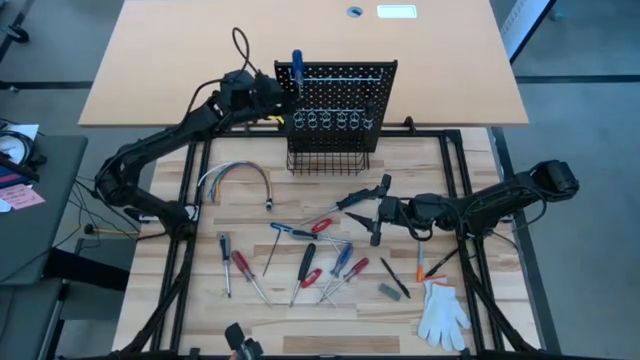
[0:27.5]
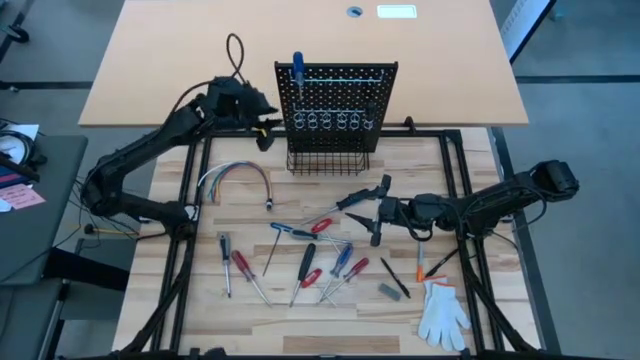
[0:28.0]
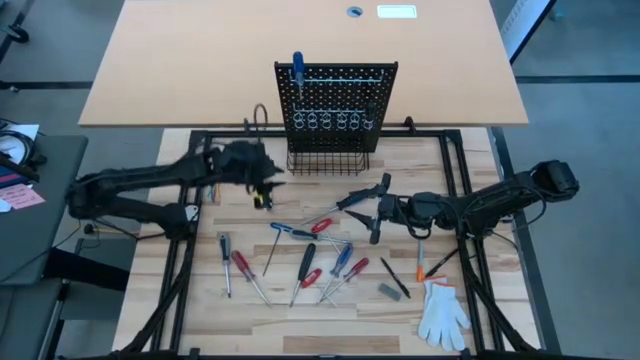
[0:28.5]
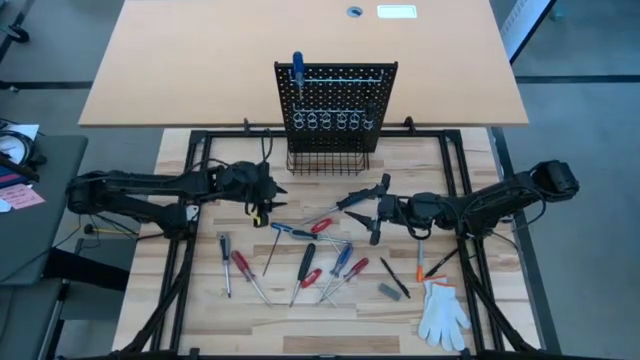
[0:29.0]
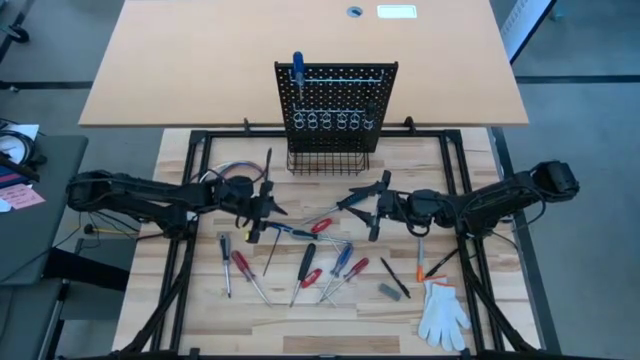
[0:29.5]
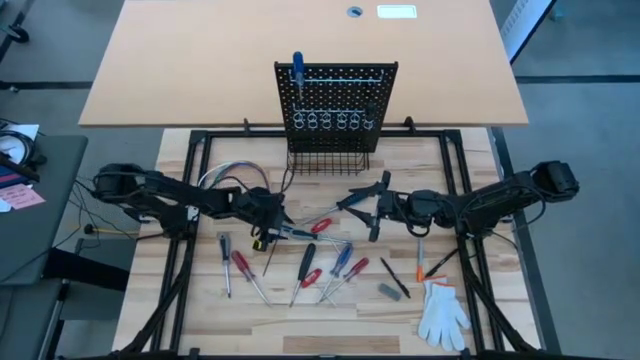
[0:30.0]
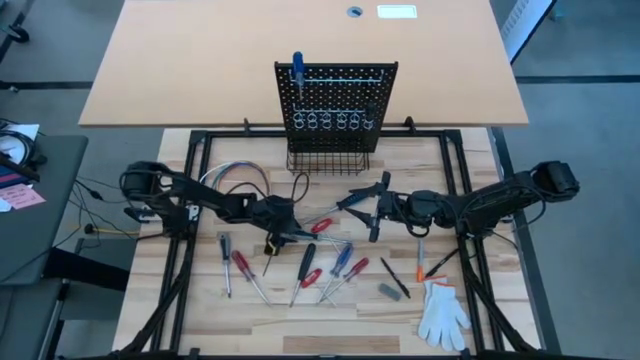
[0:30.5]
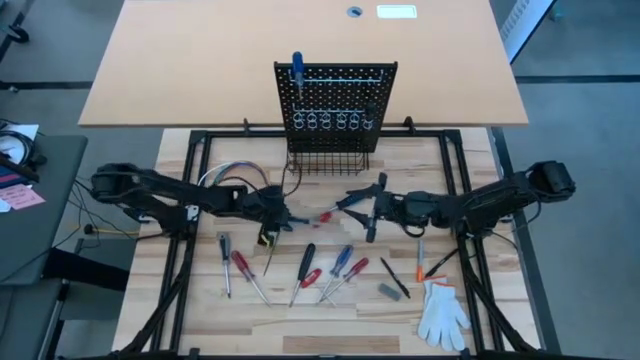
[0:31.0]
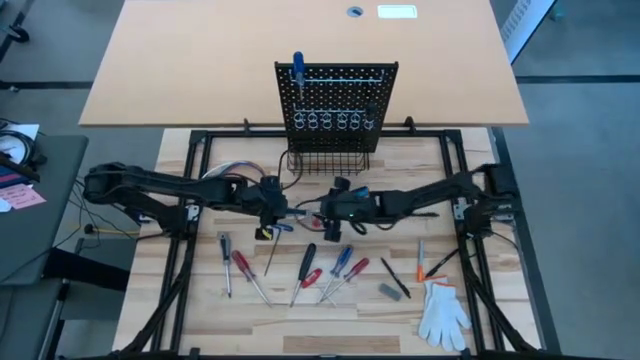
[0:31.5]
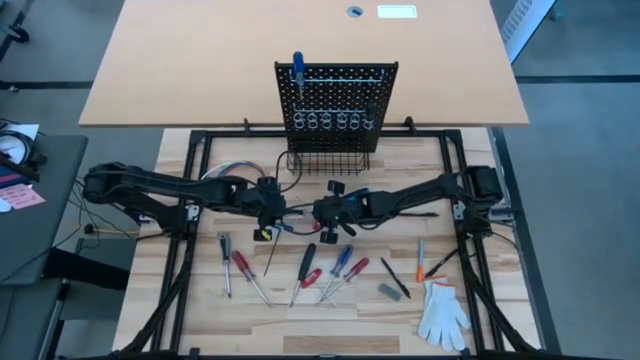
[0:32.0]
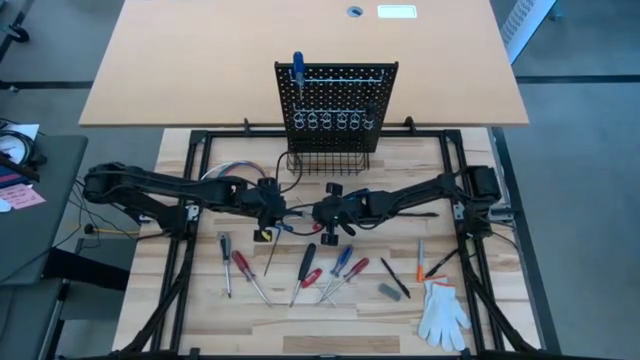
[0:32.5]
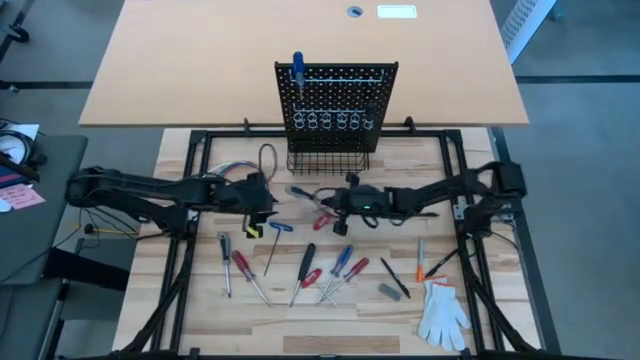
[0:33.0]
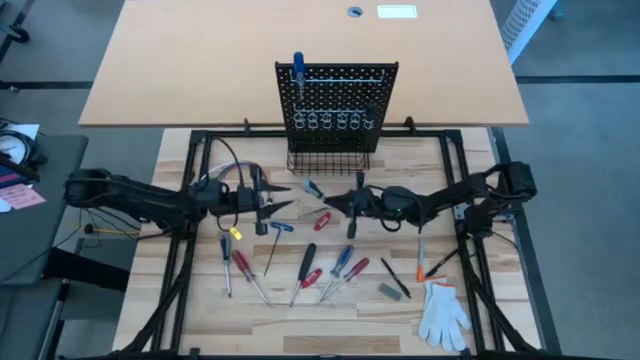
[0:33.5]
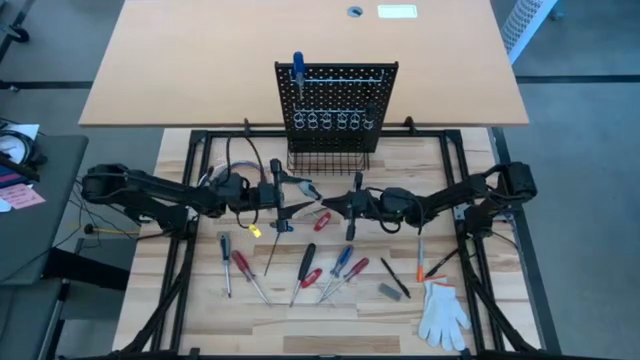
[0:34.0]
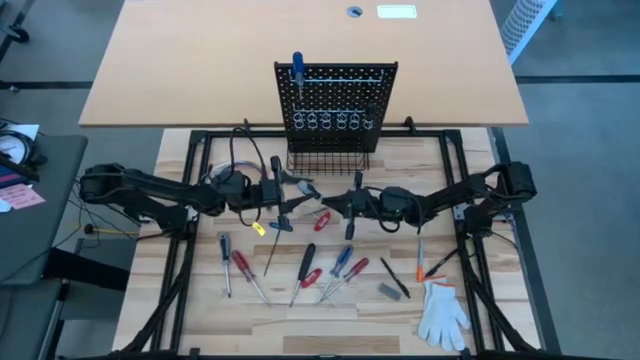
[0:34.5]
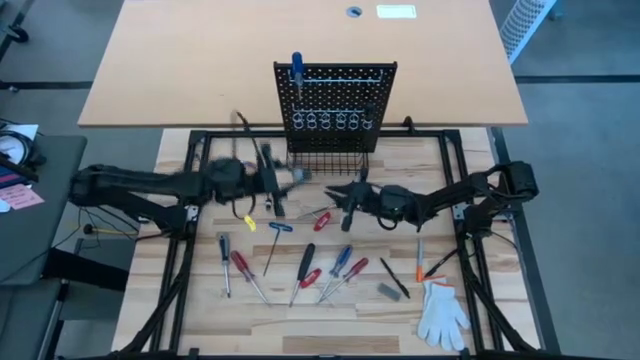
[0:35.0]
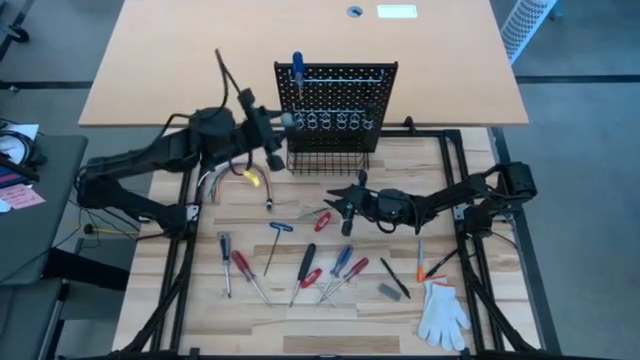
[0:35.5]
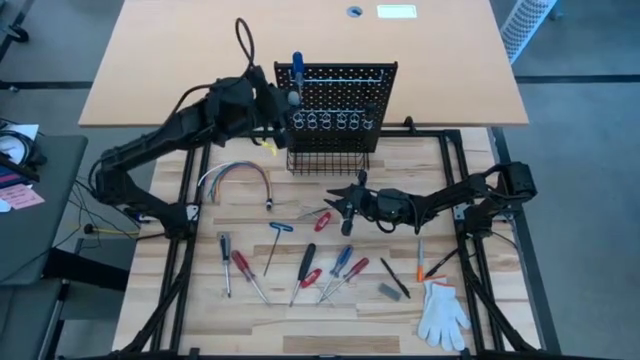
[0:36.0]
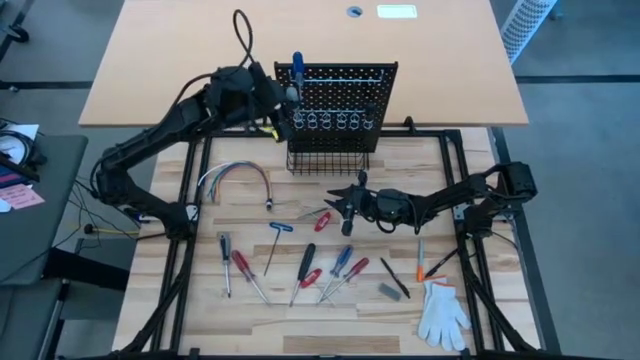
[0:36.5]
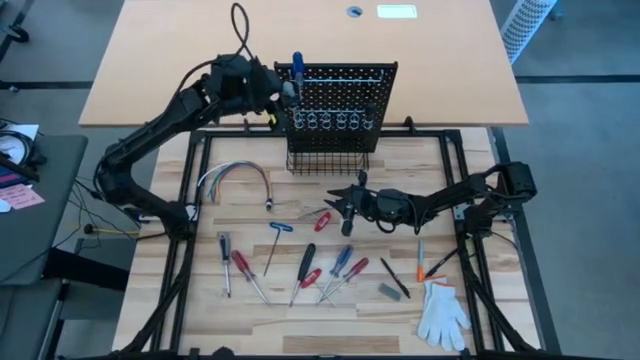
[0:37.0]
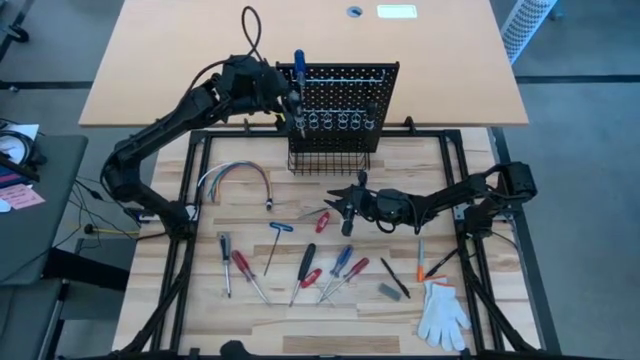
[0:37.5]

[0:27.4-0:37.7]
Task: Hang tools onto peg board
Hang the right gray screwdriver on the black peg board

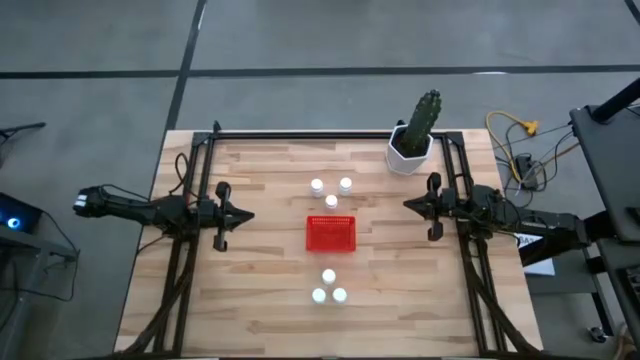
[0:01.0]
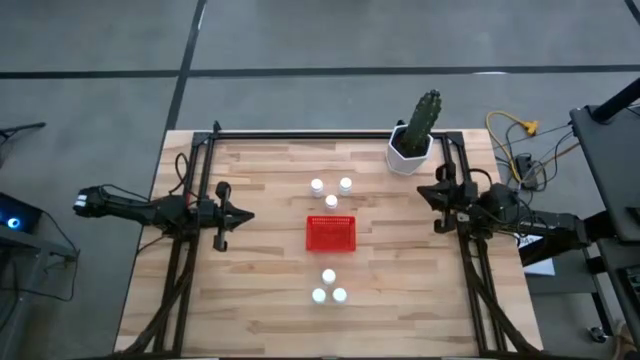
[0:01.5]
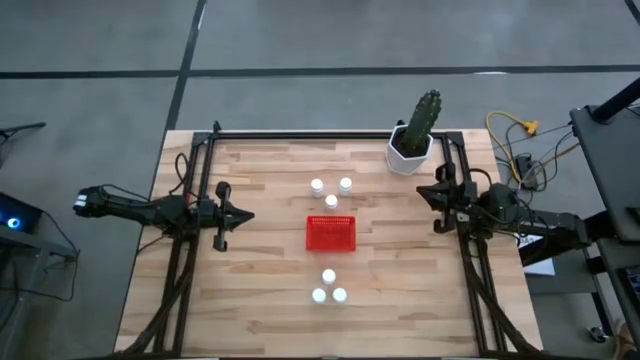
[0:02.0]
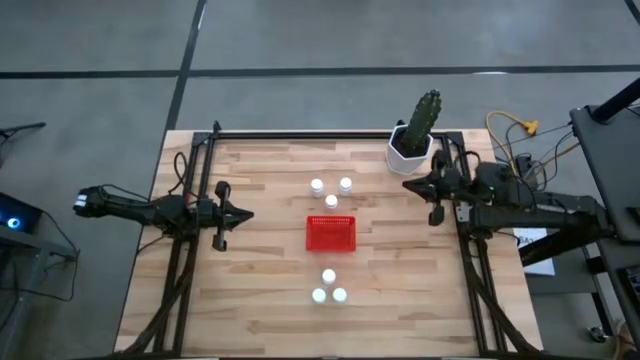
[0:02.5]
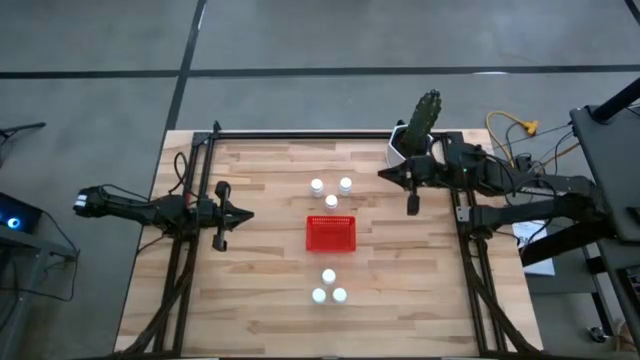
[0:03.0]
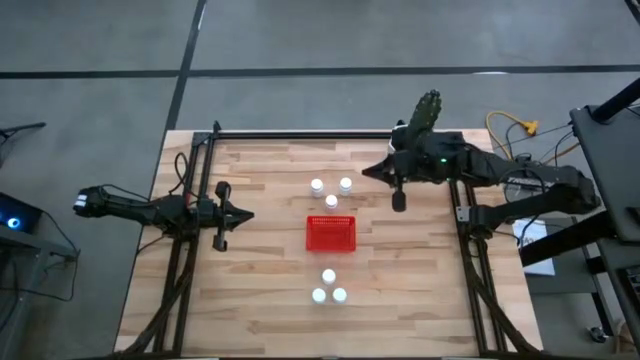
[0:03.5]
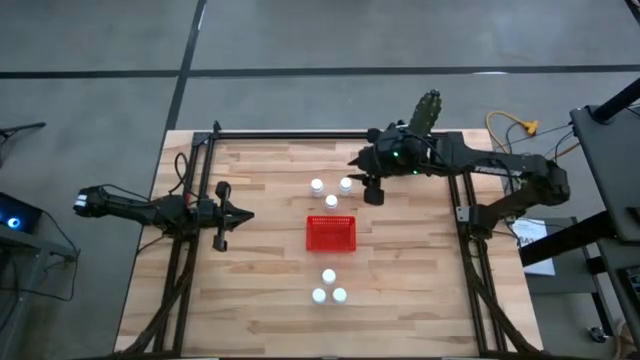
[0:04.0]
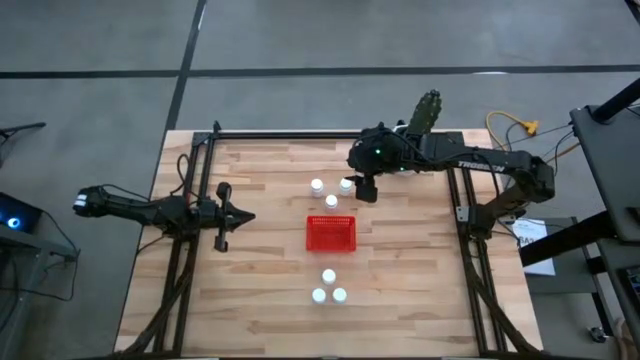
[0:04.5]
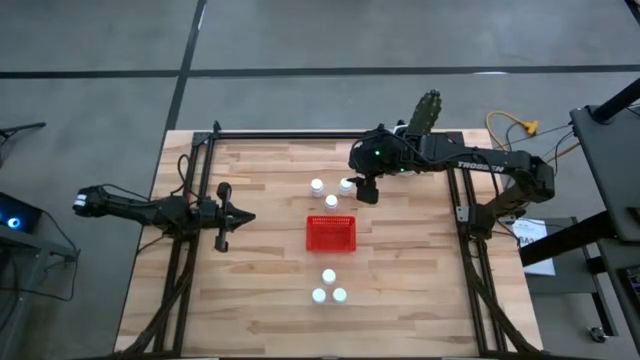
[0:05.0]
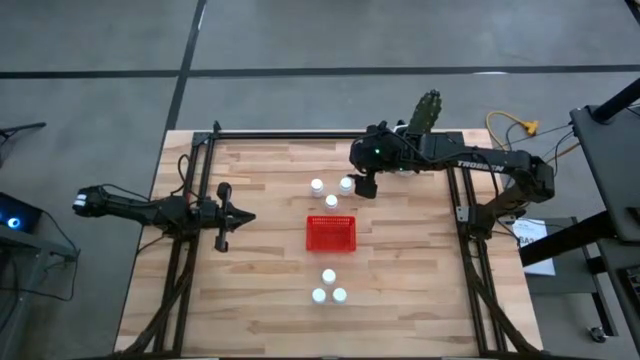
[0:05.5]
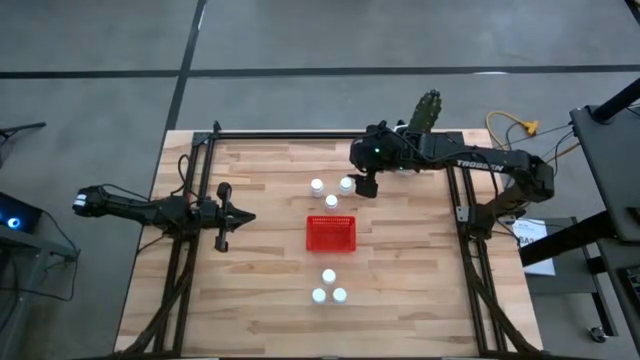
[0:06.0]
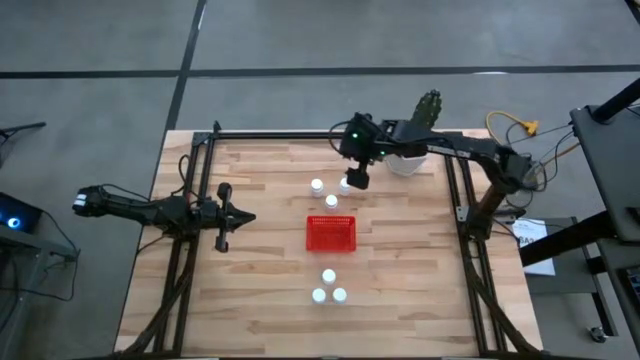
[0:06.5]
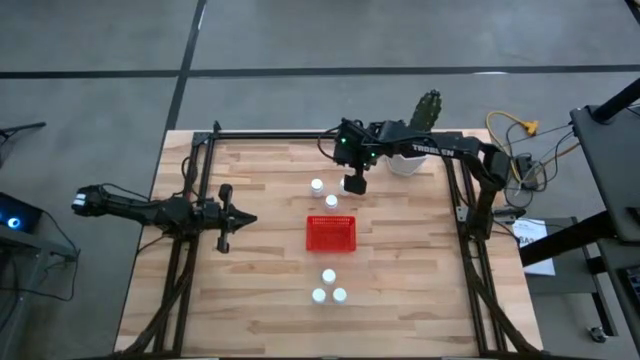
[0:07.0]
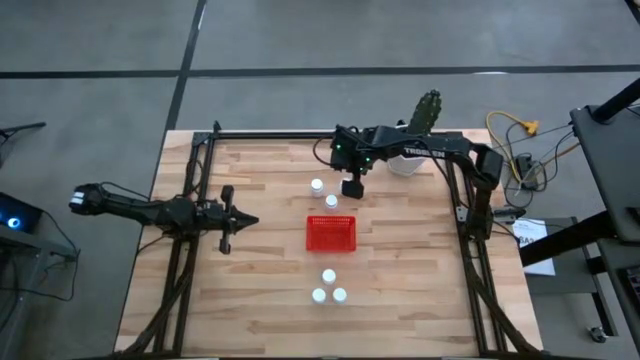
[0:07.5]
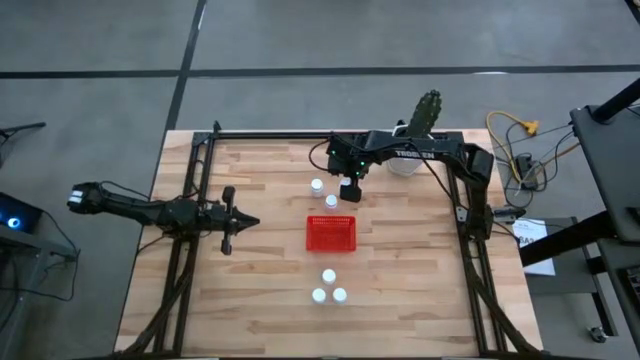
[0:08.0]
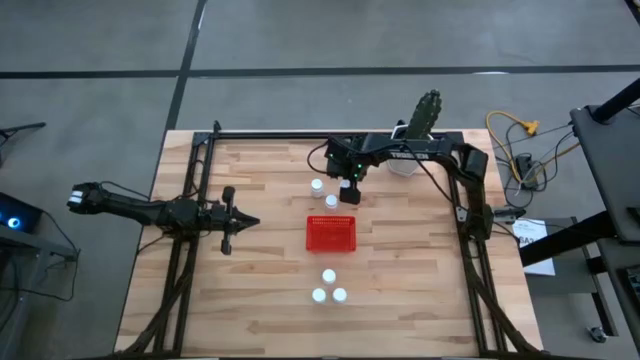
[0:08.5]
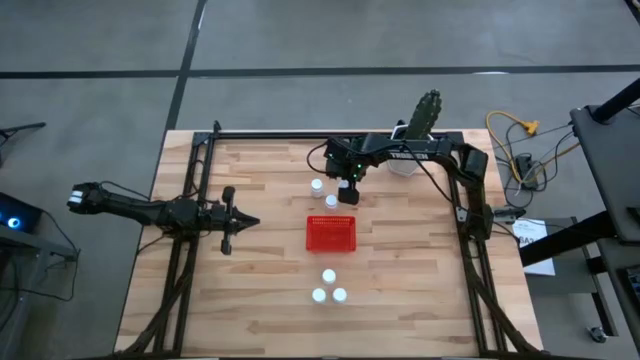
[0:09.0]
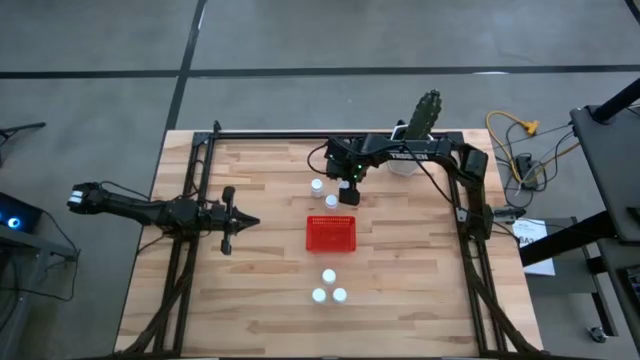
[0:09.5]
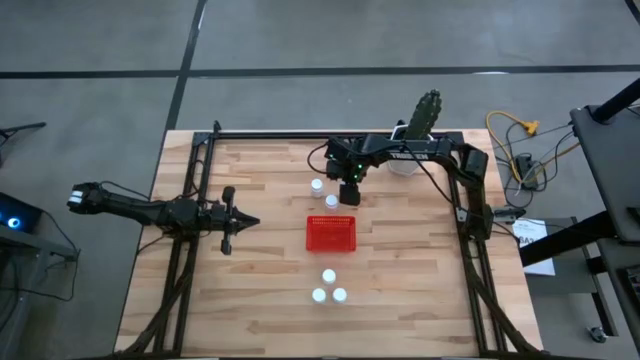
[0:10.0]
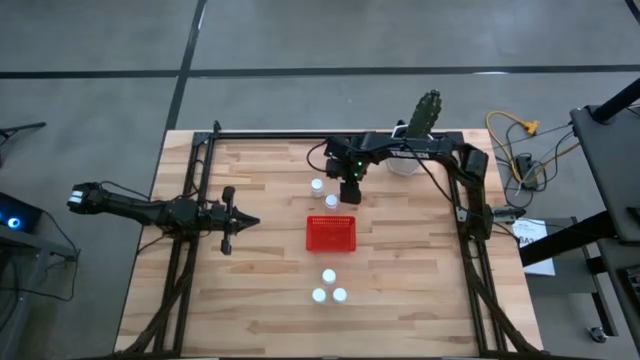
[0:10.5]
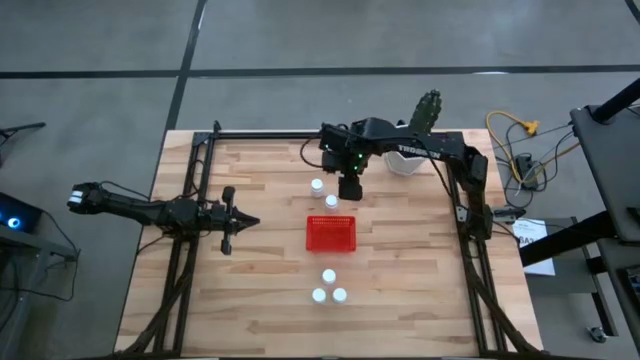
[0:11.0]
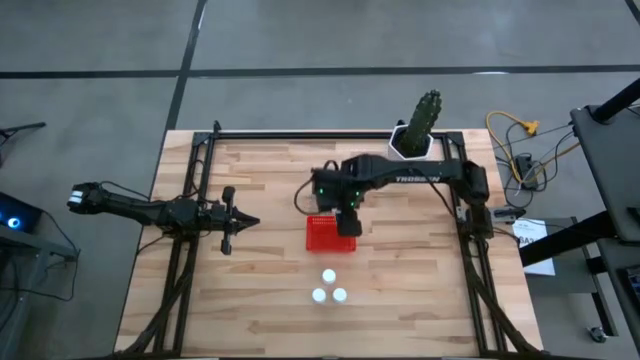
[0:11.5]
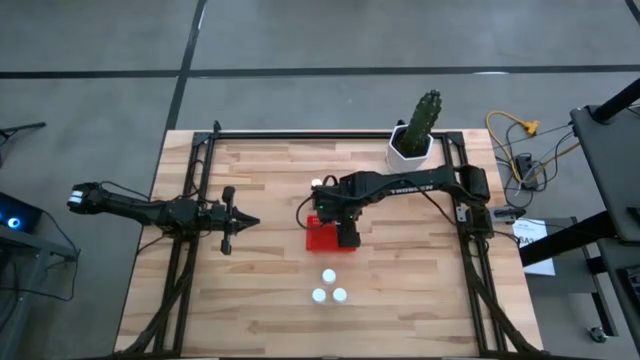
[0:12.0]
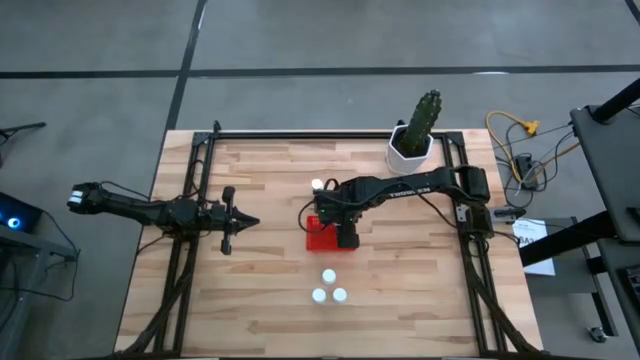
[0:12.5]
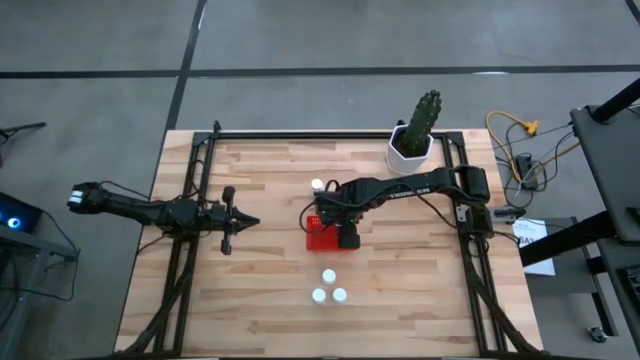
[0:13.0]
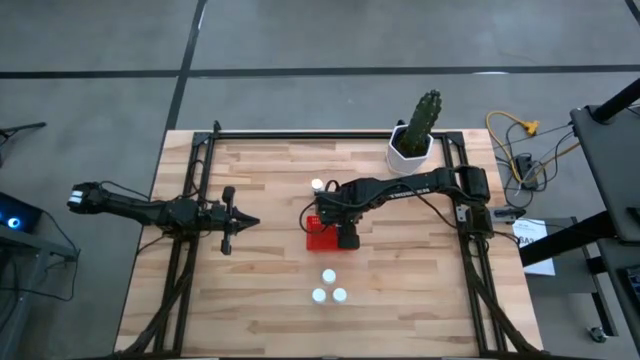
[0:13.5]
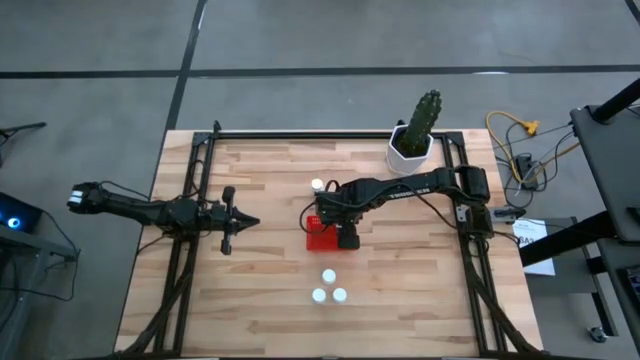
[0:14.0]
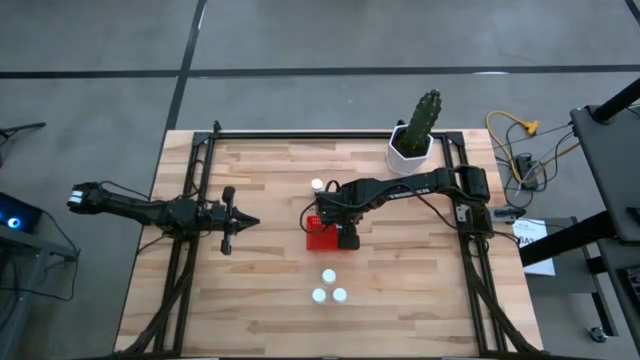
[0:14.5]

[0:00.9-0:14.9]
Task: Pick and place pill bottles into a basket
Put the white pill bottle into the red basket
